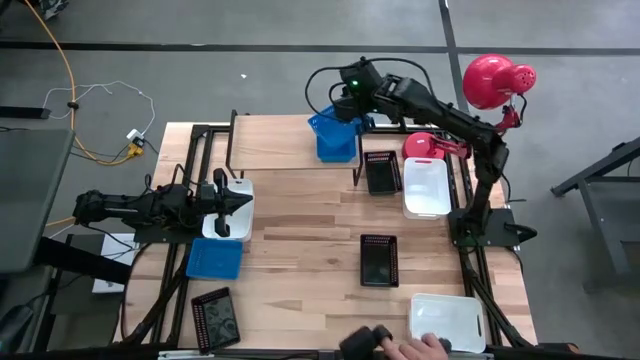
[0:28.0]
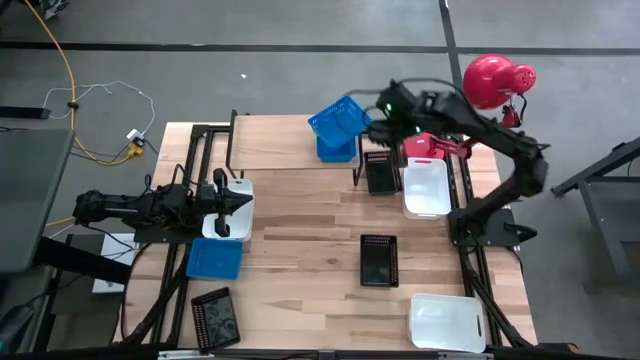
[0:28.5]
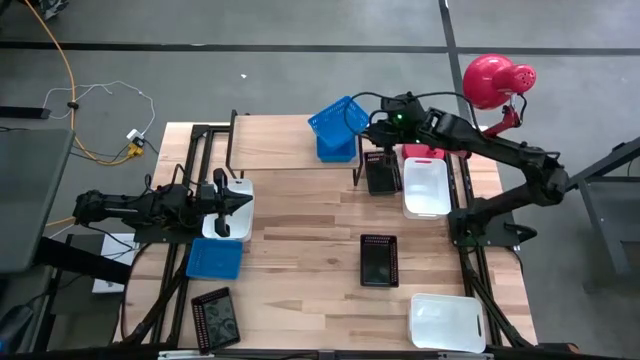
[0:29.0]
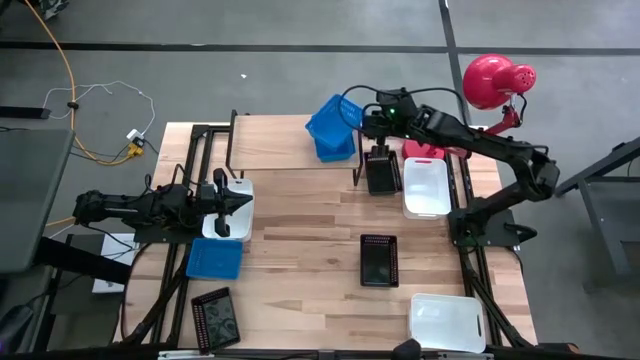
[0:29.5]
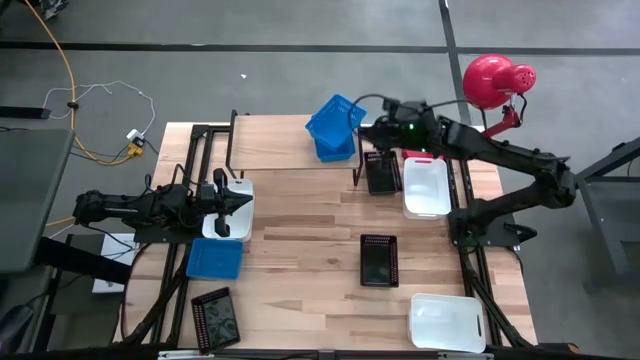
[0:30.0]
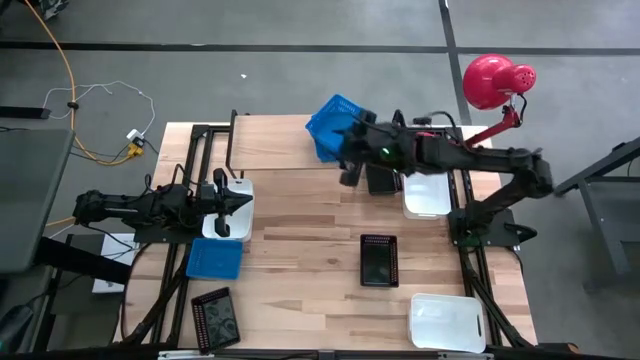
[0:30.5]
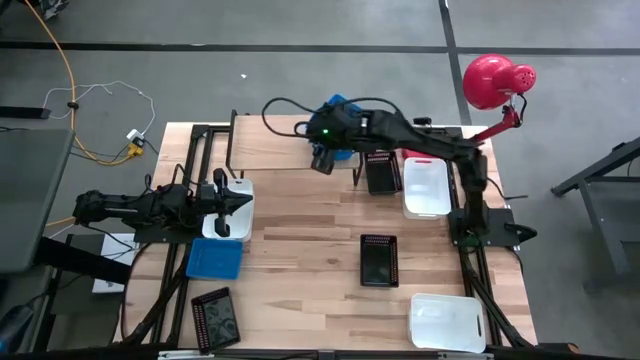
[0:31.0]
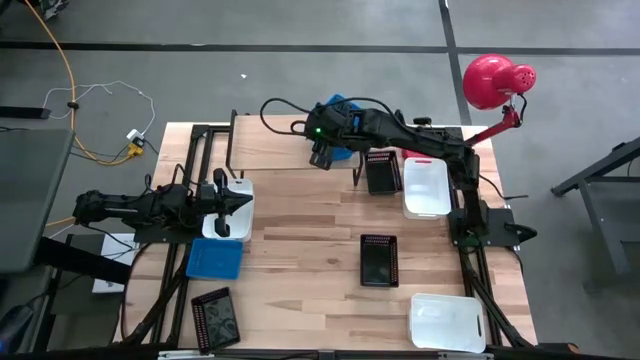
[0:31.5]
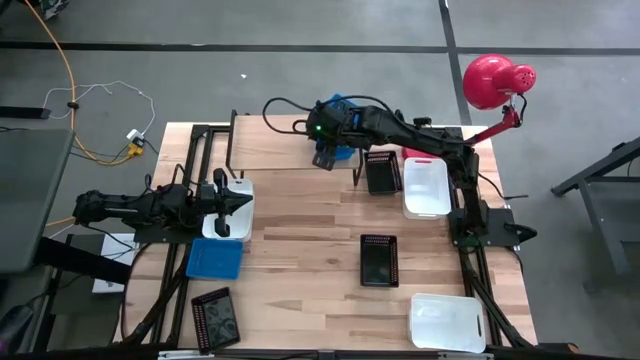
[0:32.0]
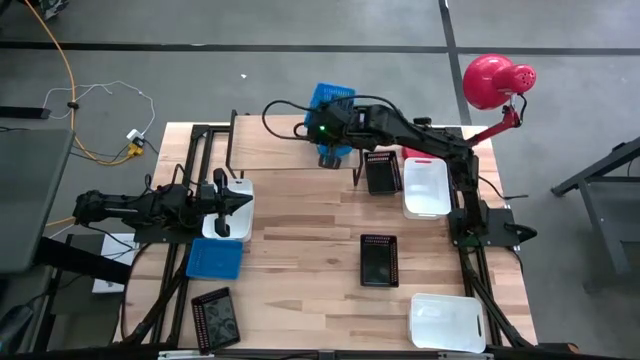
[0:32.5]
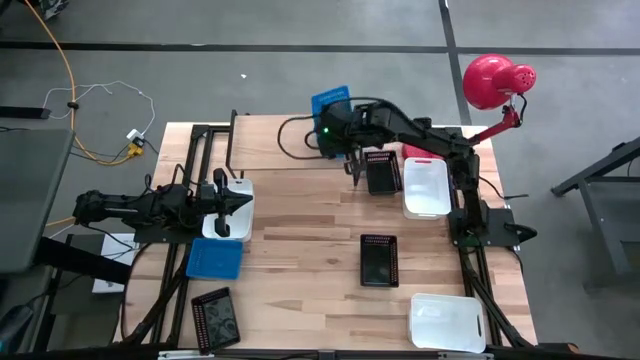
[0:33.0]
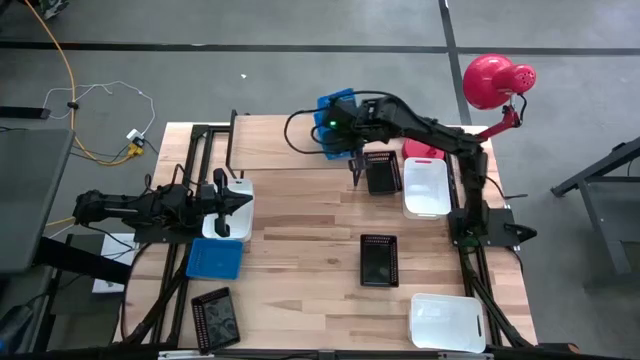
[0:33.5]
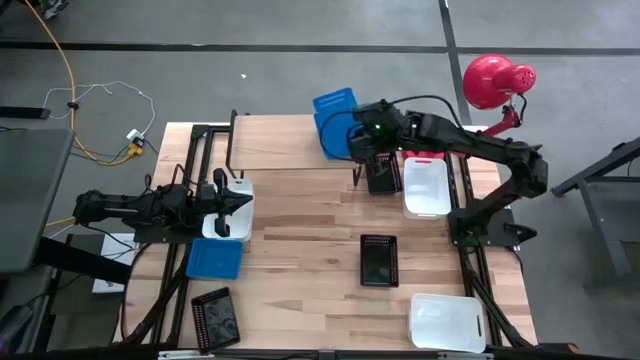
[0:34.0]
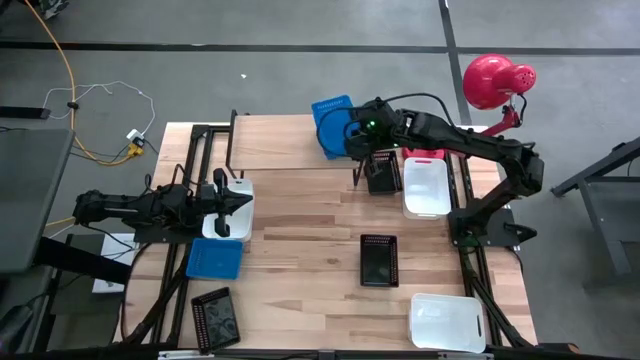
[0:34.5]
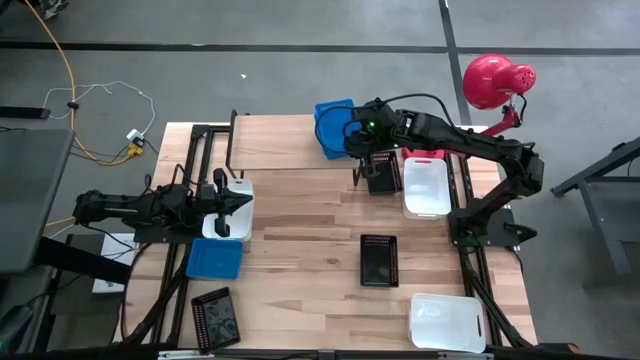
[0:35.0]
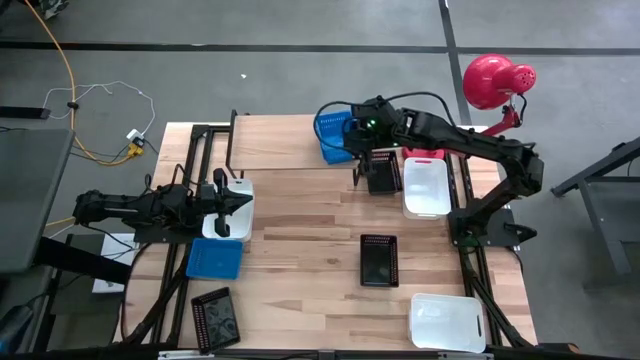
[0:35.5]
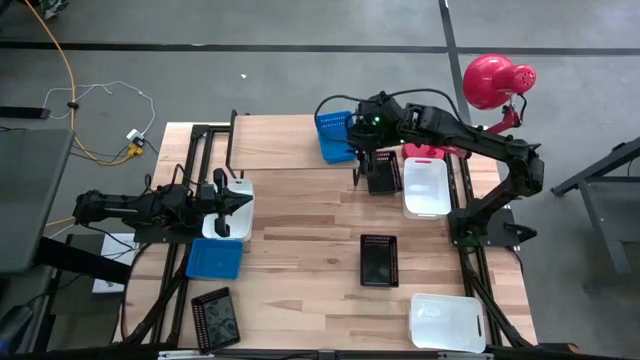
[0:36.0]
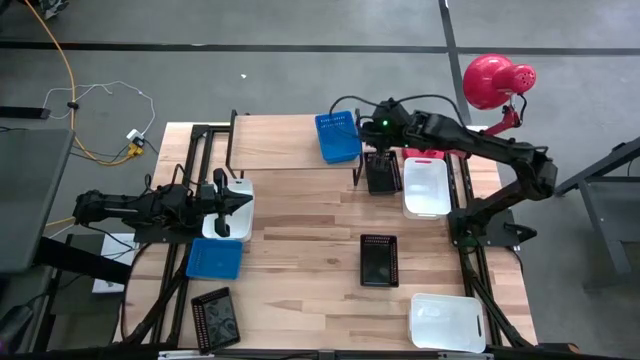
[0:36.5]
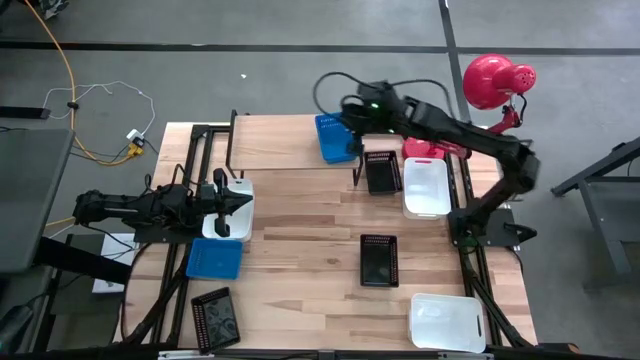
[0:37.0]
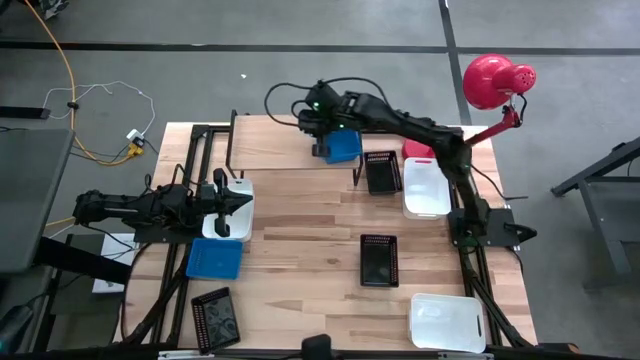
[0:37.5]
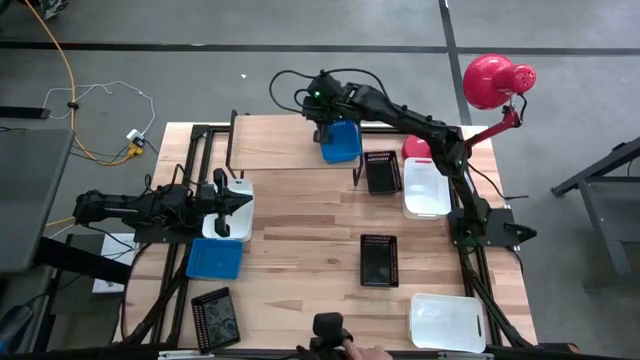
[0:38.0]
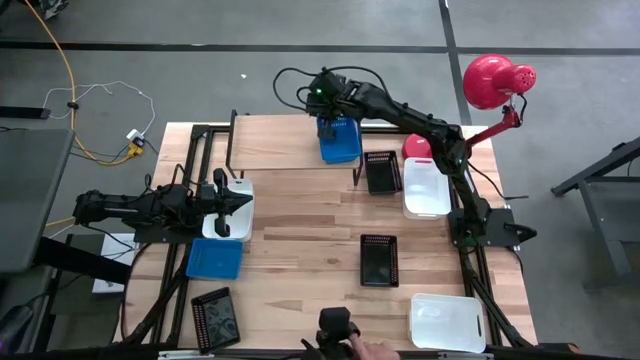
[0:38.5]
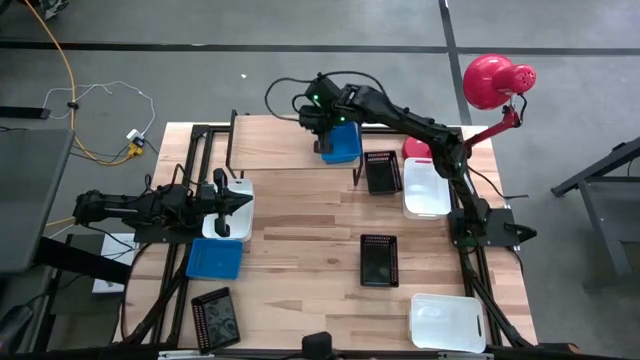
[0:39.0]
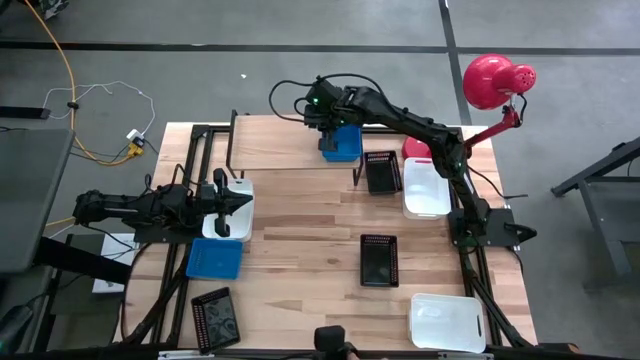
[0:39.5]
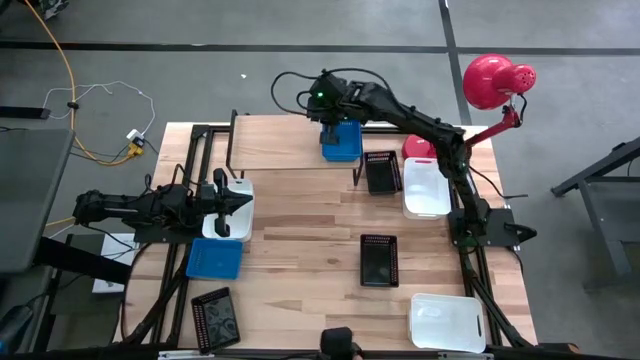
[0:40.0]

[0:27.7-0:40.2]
Task: Stack baskets on shelf by color
Stack the bottom right blue bin on the blue bin on the shelf

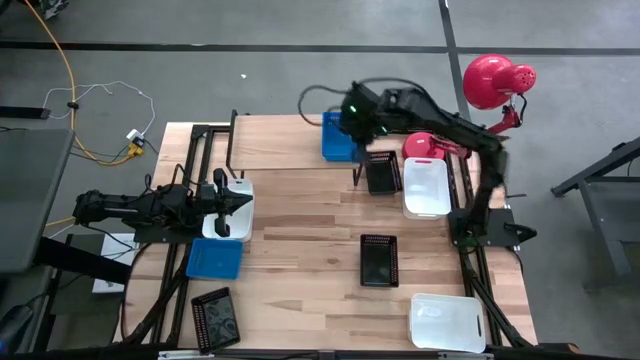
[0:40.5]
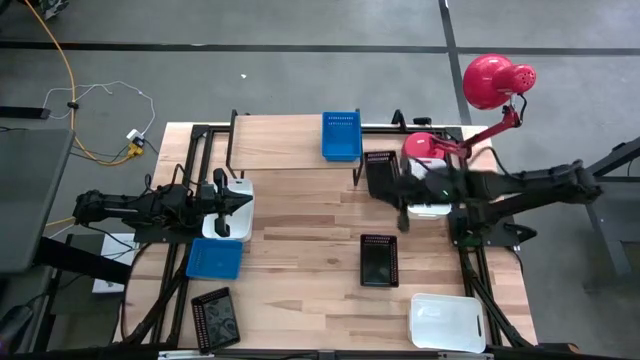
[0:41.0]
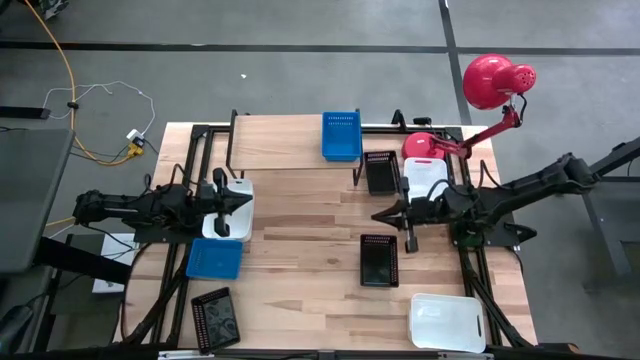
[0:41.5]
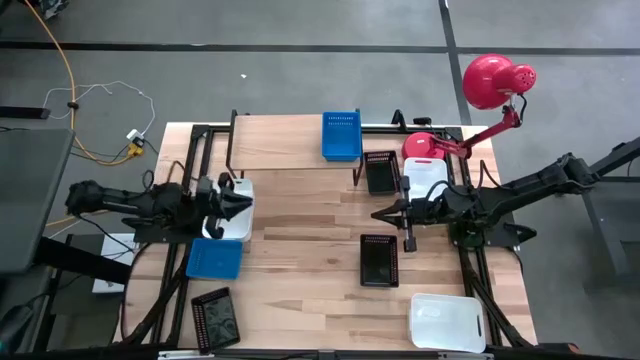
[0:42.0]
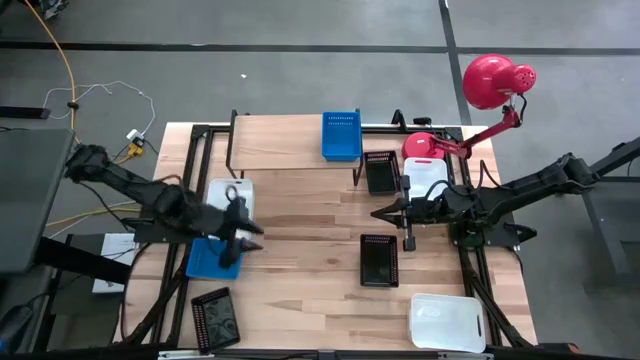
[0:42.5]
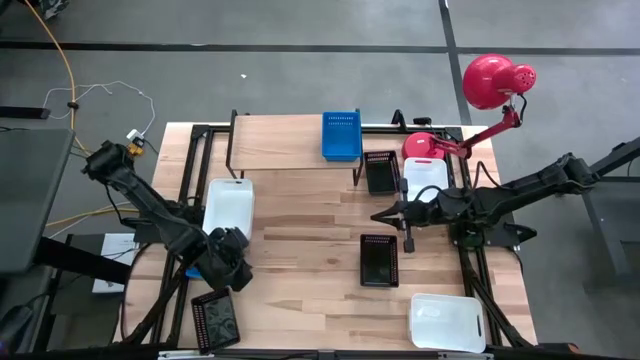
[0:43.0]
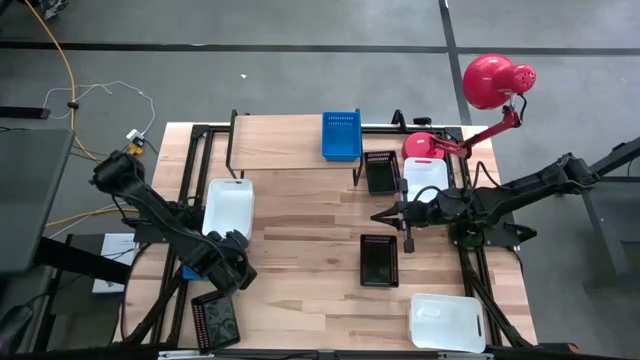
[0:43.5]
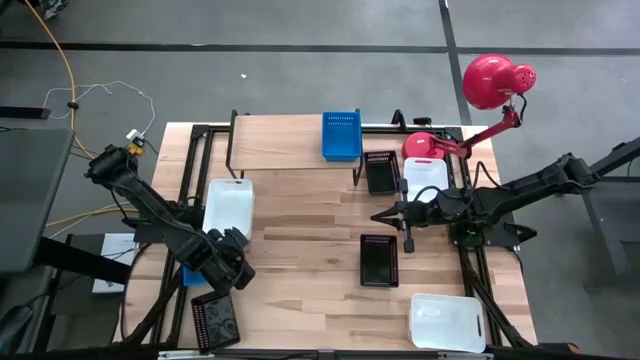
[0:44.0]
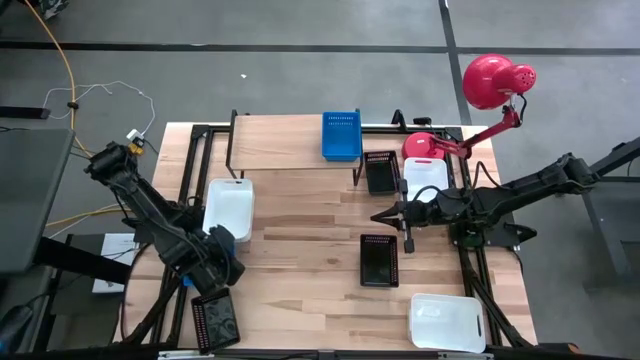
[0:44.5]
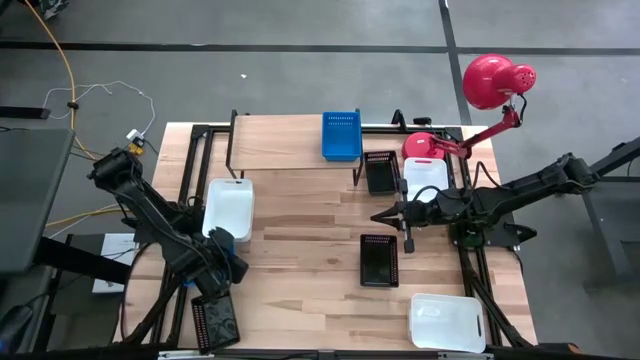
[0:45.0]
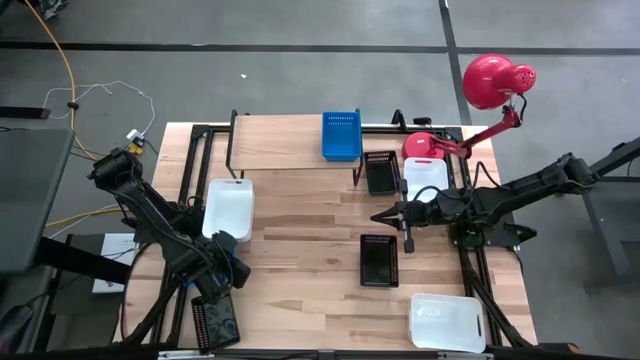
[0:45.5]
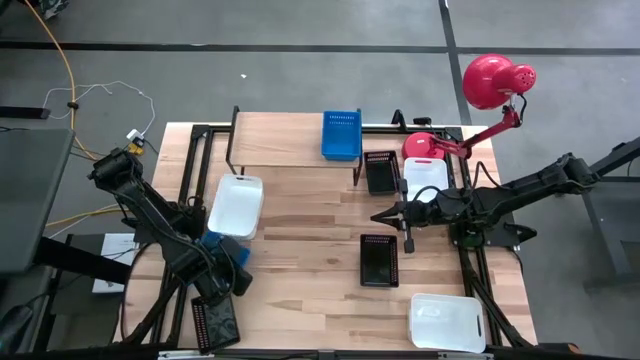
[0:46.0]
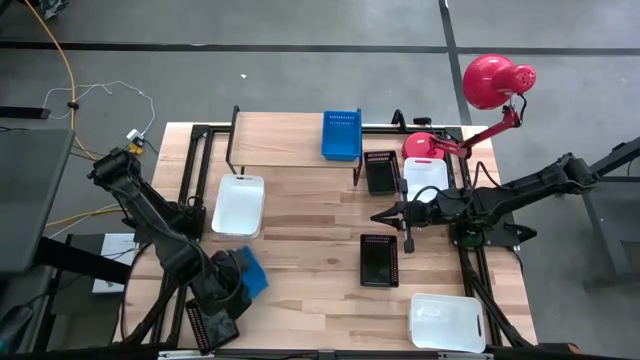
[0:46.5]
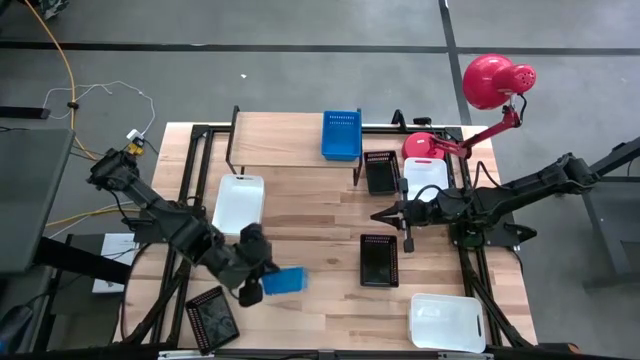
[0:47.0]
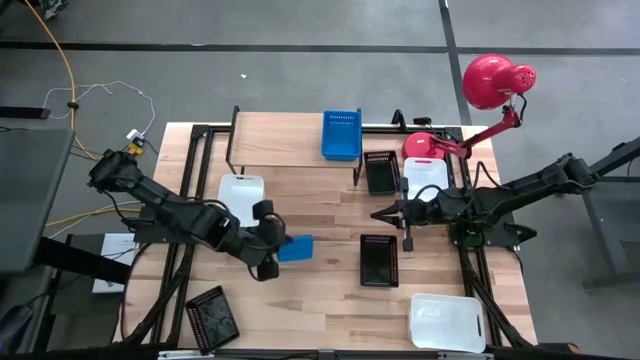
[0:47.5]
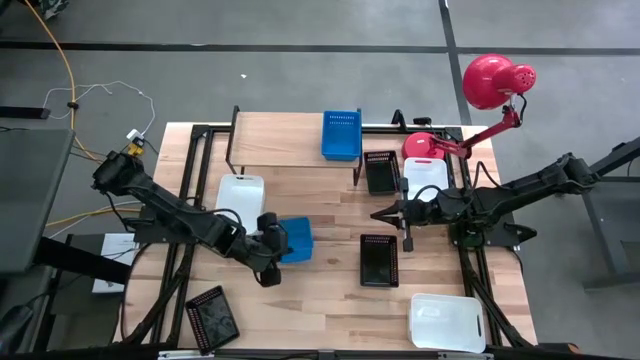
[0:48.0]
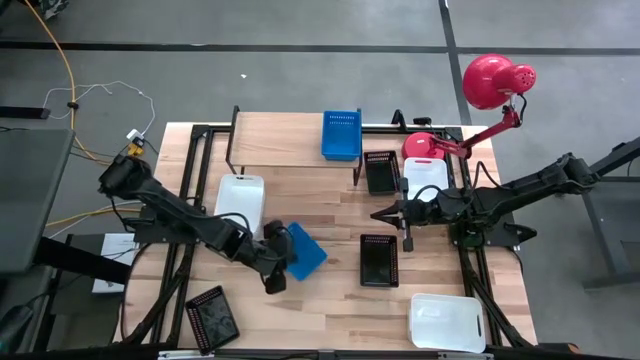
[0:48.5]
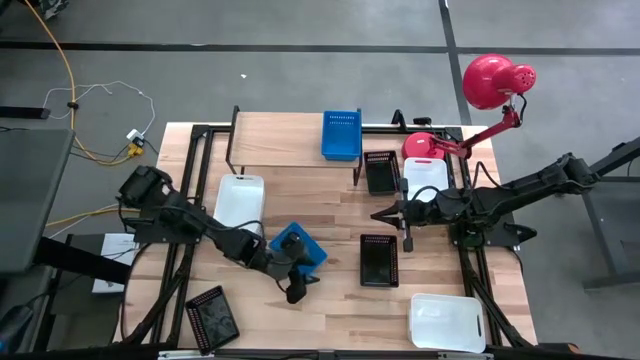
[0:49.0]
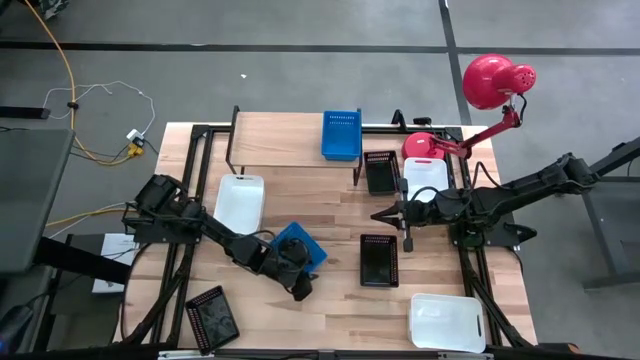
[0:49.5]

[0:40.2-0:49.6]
Stack the blue bin on the blue bin on the shelf
